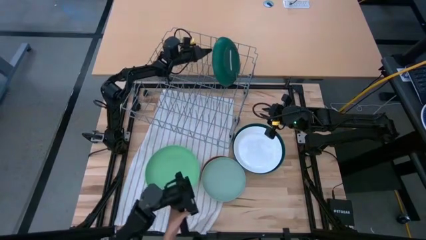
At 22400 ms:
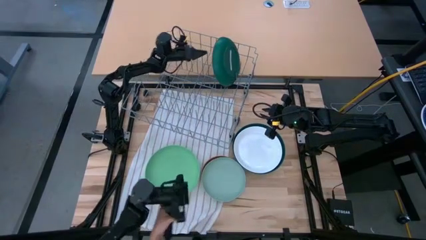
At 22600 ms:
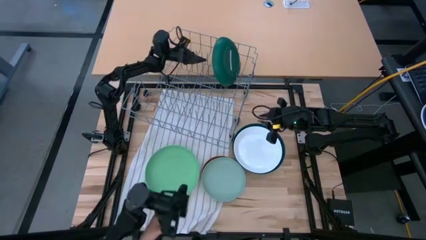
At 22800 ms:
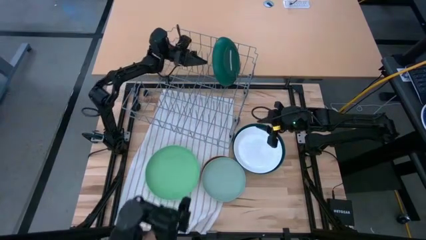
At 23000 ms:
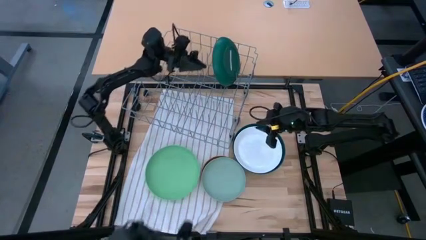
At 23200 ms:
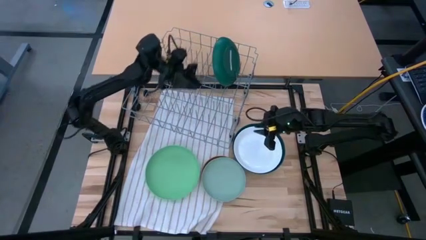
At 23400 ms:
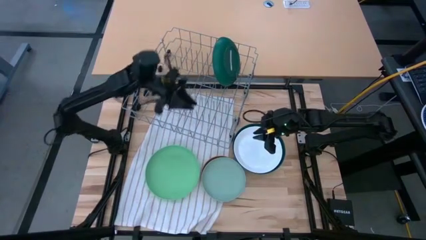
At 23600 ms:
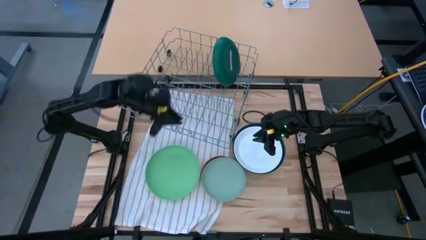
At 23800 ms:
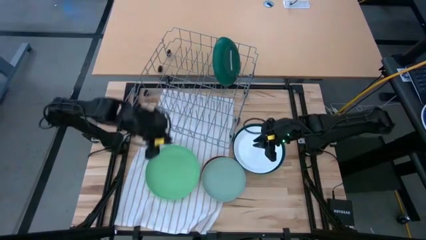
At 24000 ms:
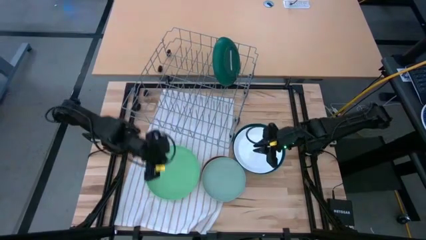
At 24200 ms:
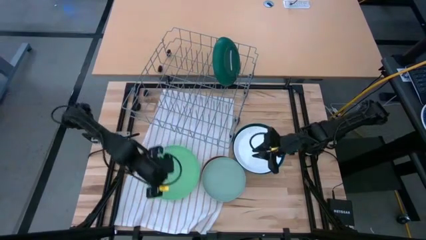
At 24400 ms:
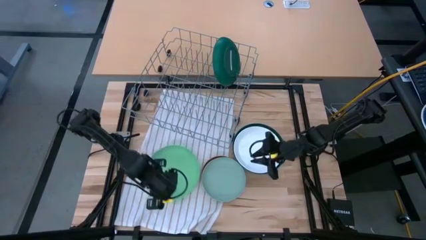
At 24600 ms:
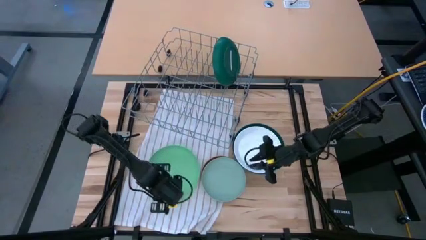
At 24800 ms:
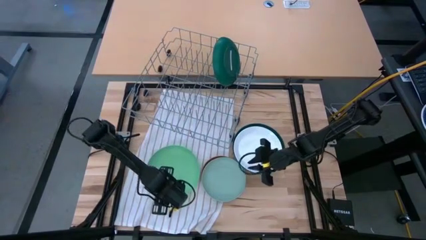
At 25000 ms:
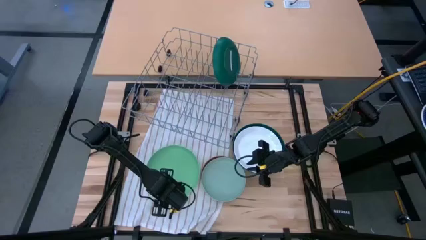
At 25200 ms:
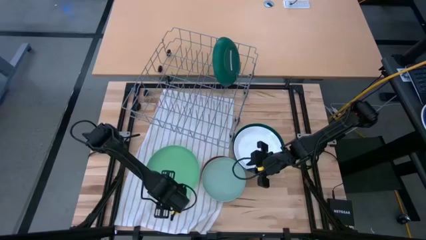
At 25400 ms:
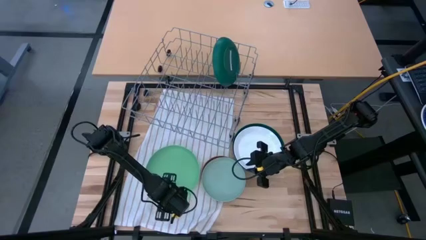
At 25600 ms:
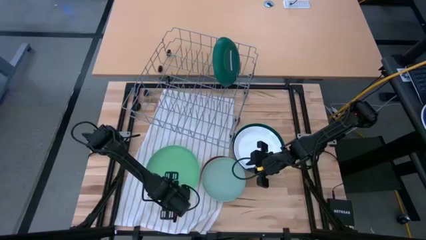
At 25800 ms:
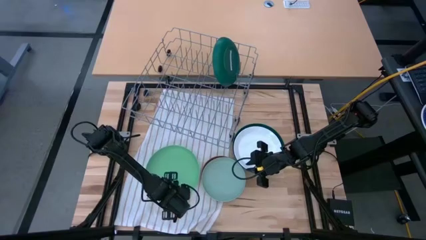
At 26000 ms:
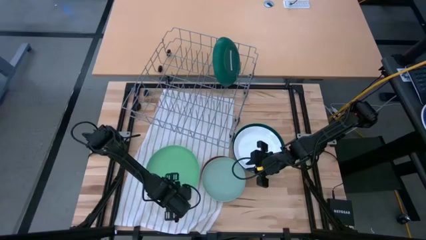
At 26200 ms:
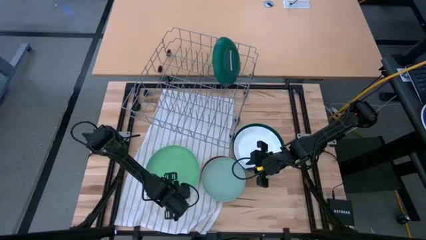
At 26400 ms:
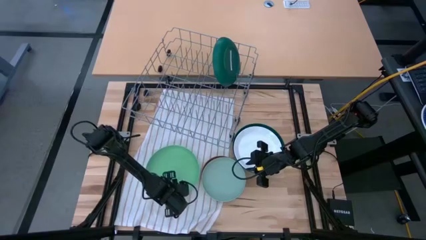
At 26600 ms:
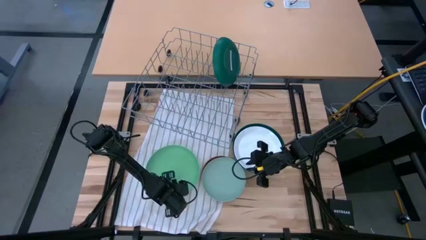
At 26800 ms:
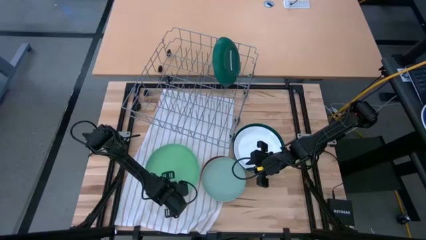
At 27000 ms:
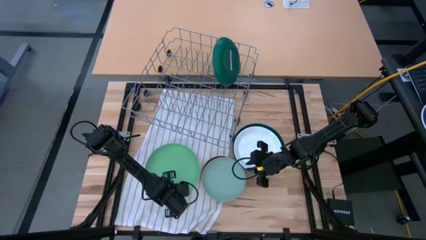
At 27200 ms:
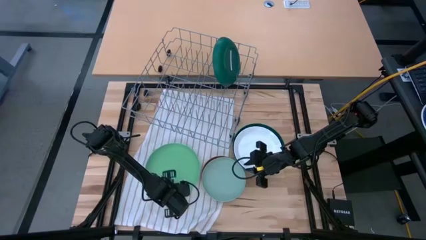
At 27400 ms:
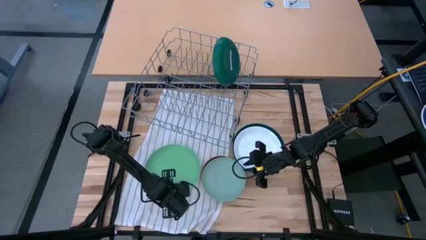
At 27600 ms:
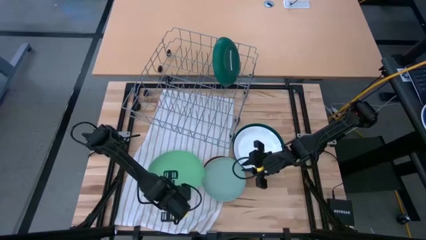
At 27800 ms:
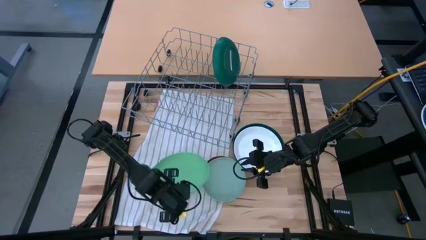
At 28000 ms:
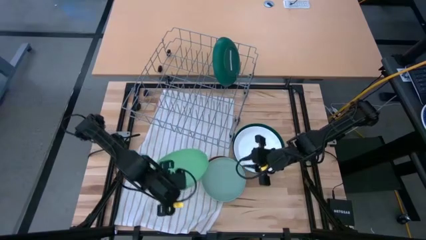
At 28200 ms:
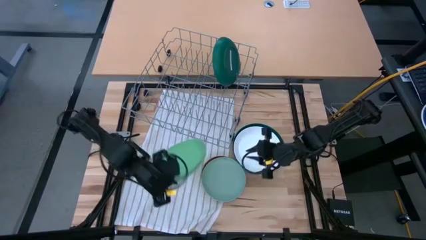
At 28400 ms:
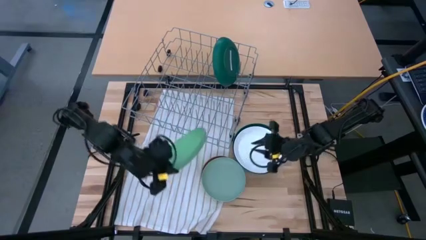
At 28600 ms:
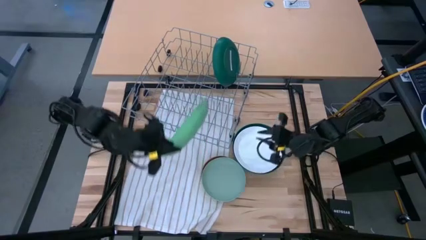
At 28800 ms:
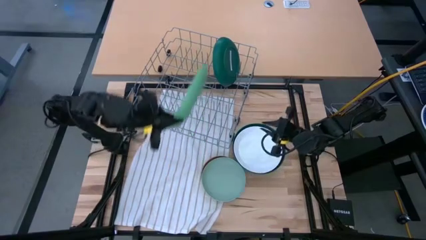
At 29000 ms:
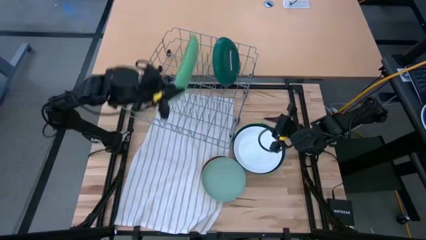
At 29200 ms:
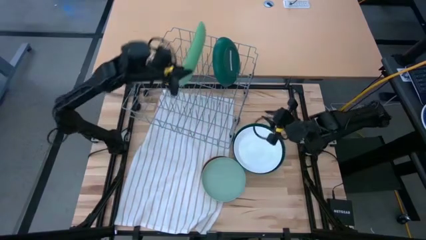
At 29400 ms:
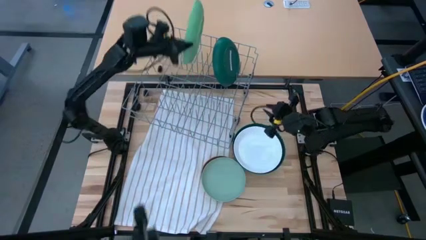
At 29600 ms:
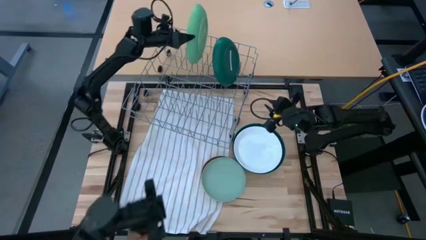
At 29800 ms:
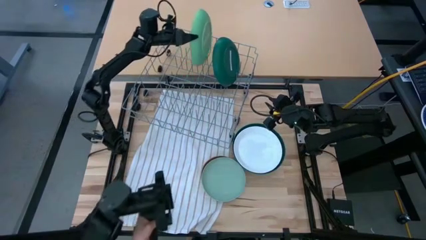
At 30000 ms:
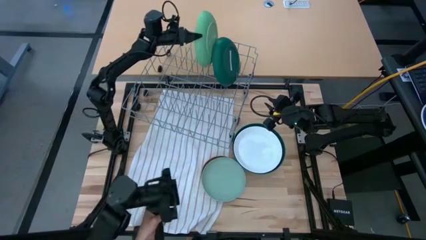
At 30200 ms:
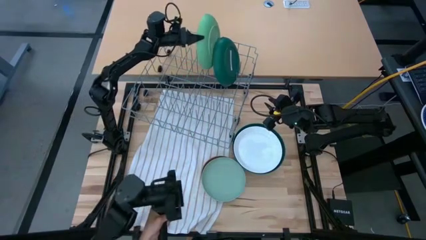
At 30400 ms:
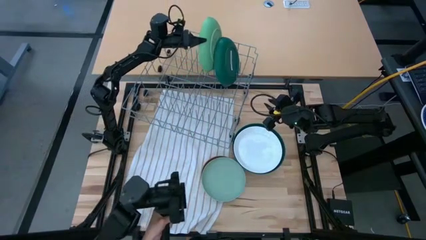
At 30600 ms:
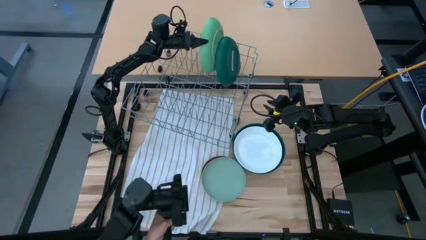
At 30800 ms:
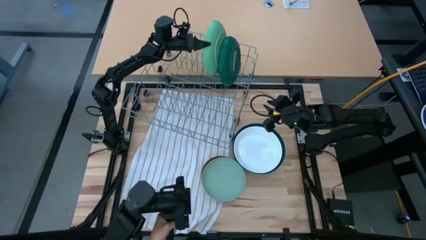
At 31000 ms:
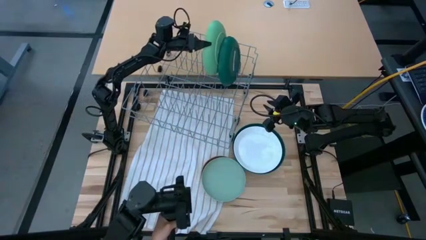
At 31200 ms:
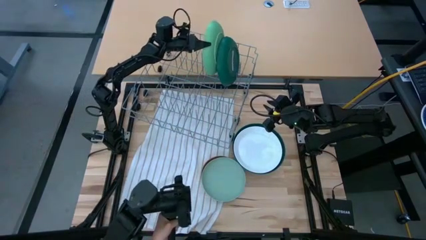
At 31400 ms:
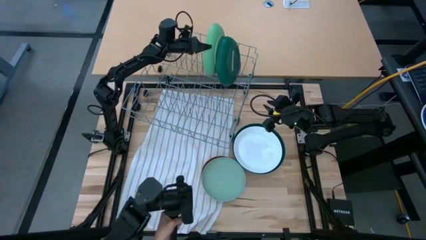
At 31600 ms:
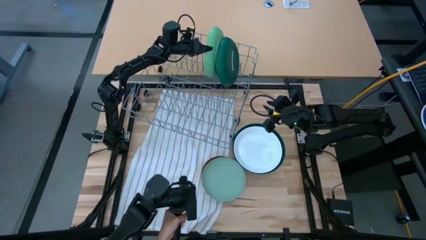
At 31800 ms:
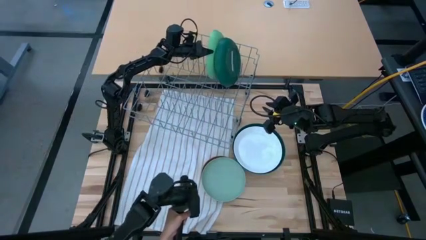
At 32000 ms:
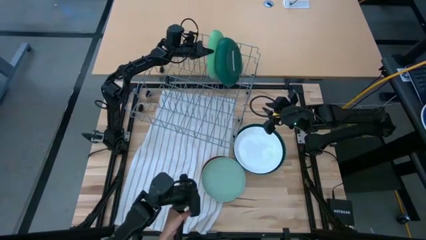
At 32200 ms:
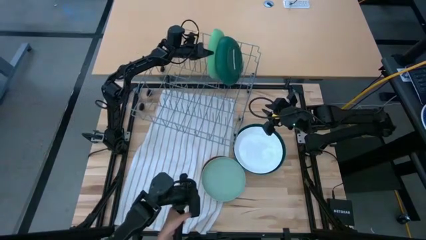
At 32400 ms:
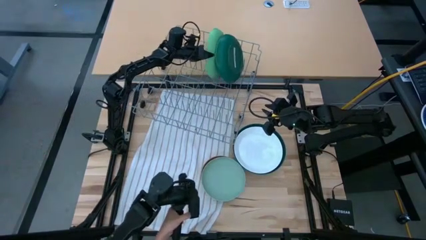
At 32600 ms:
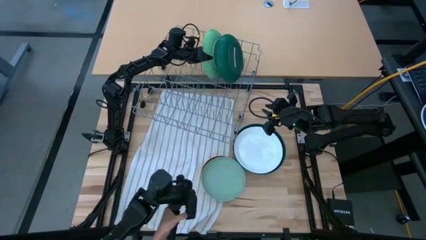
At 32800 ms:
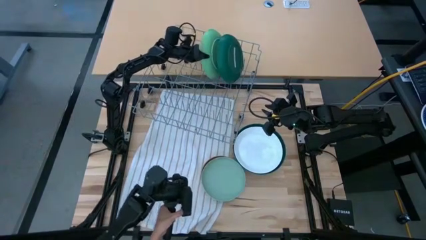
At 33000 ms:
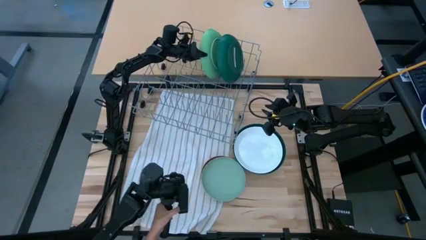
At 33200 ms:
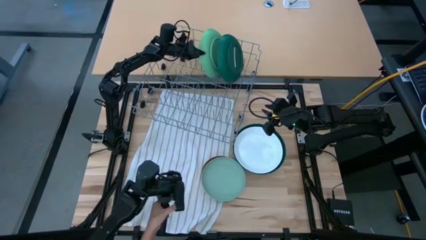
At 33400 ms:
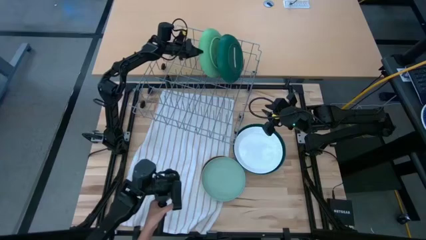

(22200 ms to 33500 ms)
Task: Sort dishes
Put the left light green plate into the dishwasher rack
